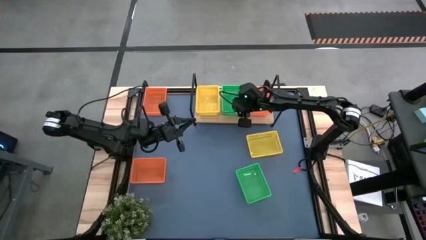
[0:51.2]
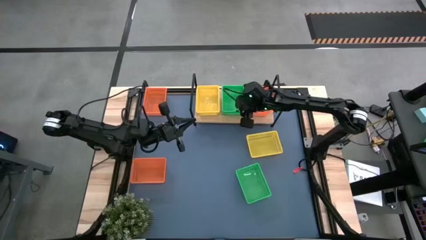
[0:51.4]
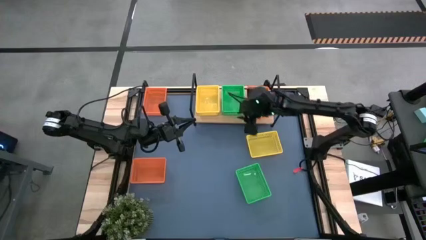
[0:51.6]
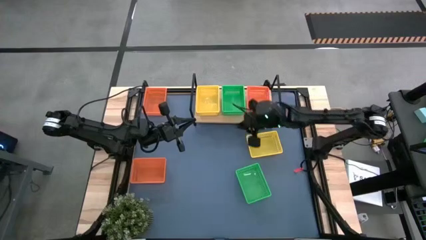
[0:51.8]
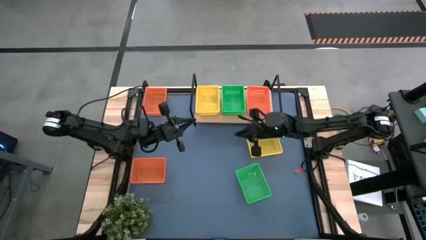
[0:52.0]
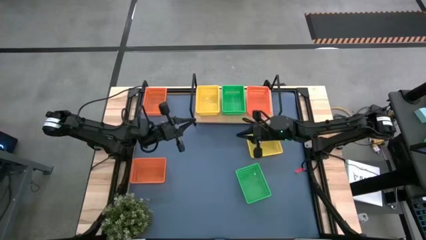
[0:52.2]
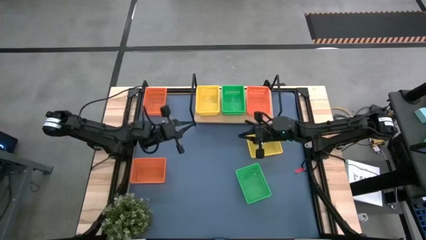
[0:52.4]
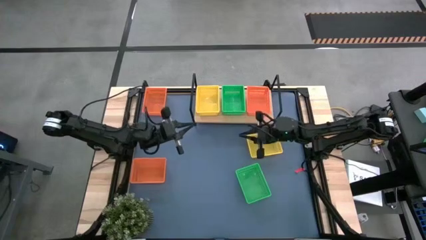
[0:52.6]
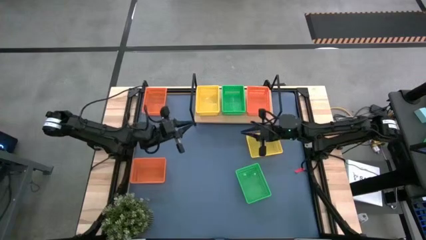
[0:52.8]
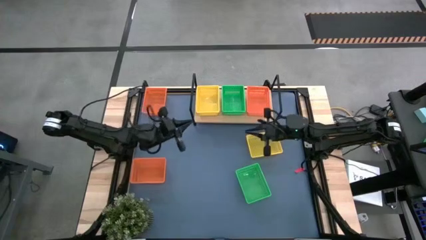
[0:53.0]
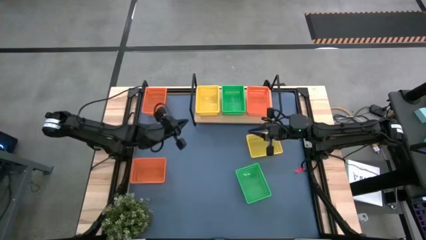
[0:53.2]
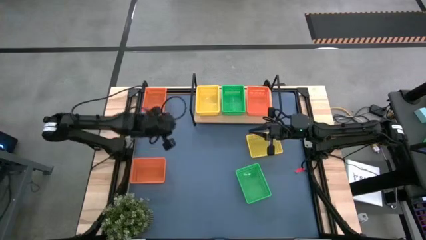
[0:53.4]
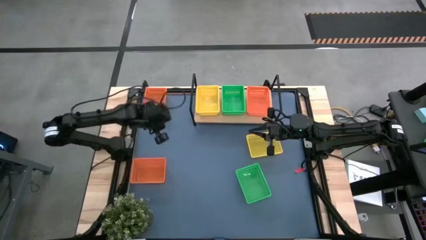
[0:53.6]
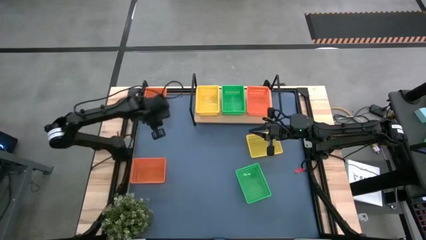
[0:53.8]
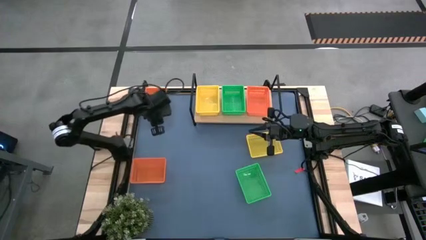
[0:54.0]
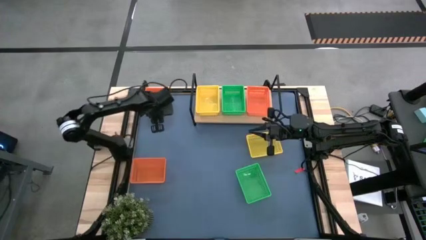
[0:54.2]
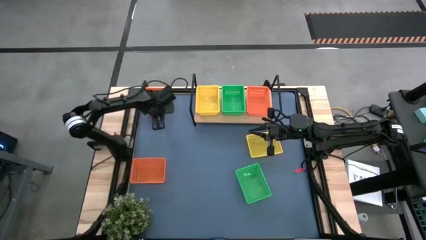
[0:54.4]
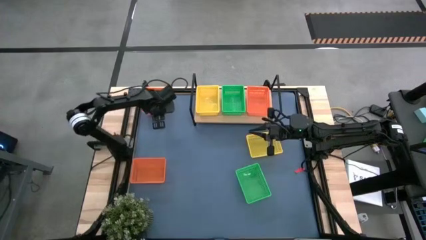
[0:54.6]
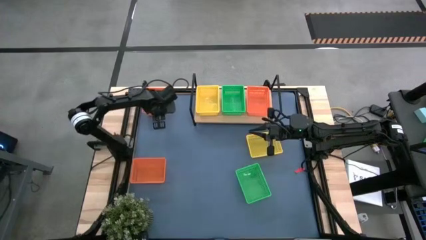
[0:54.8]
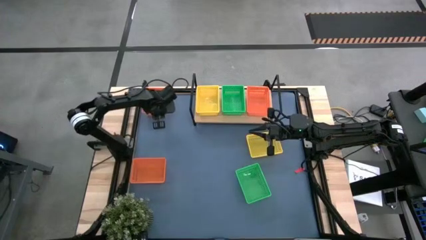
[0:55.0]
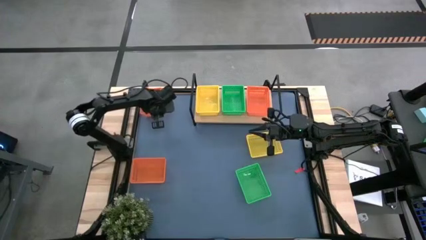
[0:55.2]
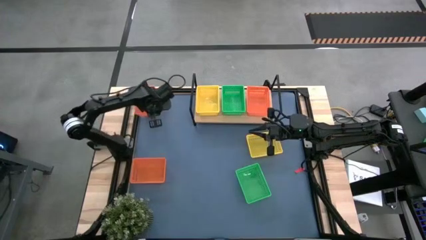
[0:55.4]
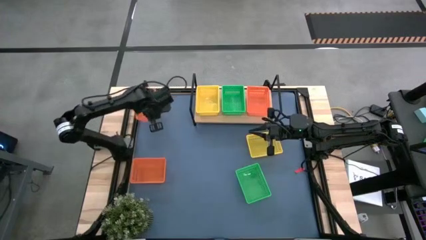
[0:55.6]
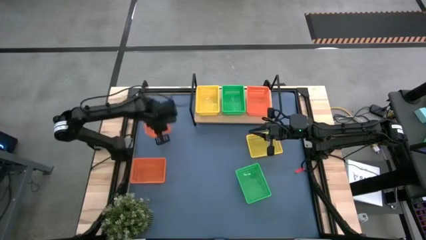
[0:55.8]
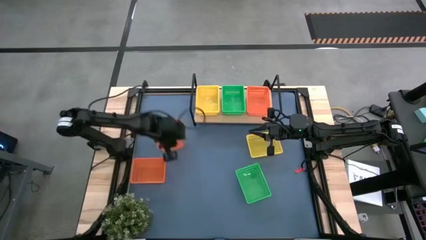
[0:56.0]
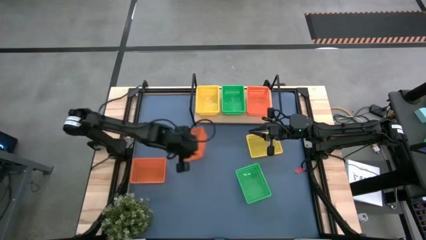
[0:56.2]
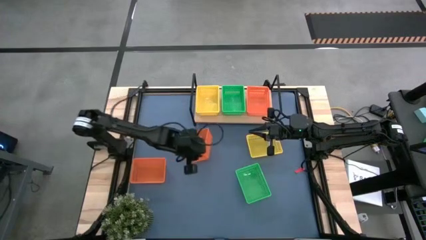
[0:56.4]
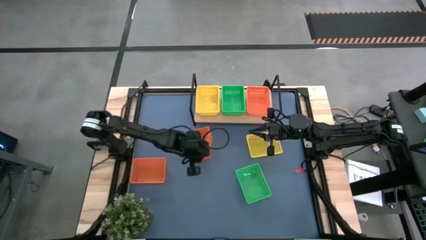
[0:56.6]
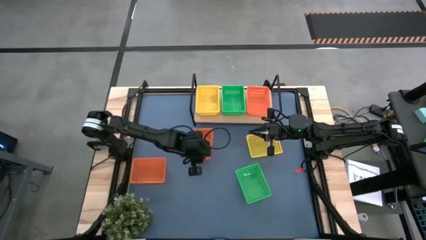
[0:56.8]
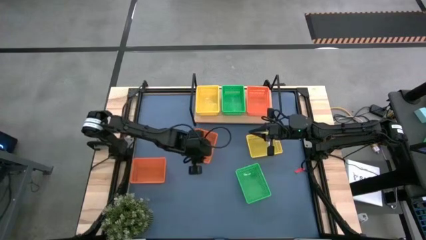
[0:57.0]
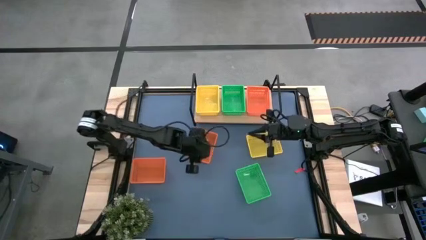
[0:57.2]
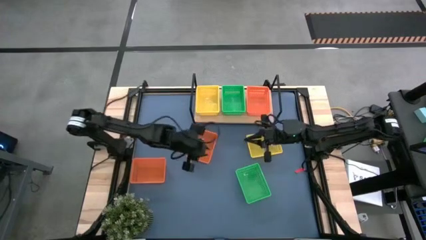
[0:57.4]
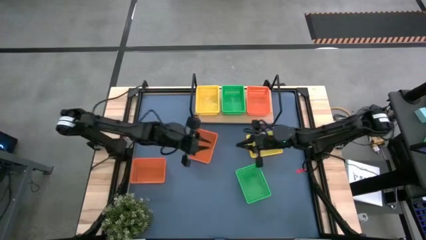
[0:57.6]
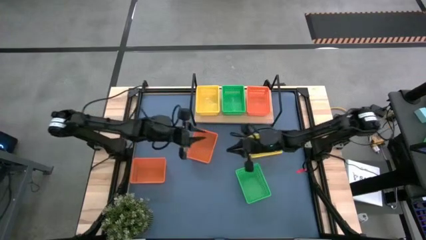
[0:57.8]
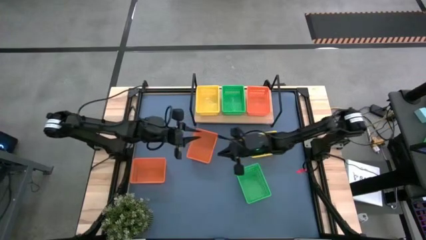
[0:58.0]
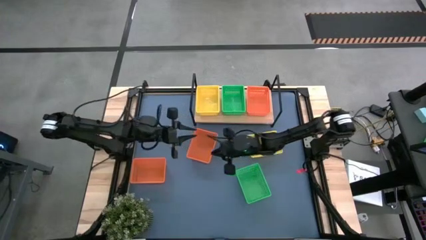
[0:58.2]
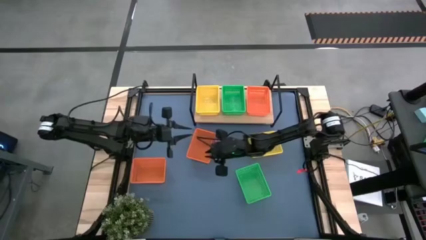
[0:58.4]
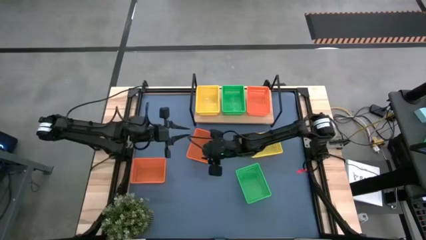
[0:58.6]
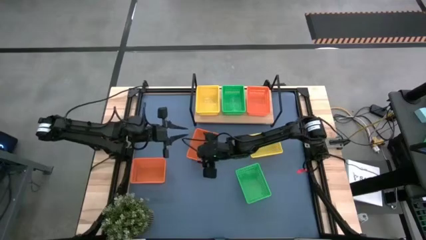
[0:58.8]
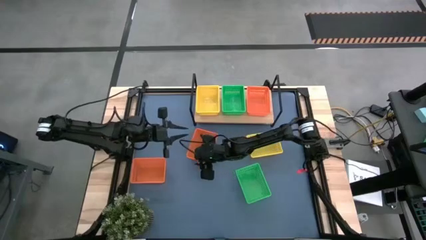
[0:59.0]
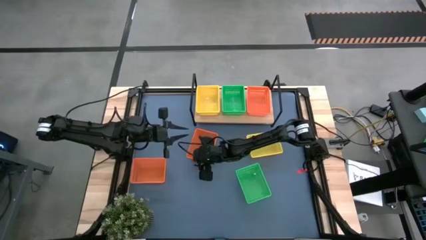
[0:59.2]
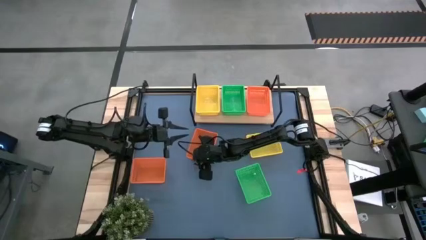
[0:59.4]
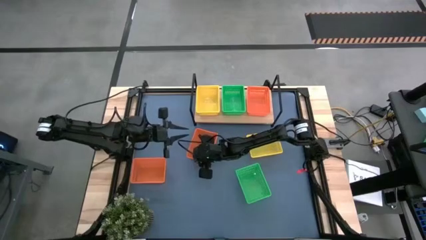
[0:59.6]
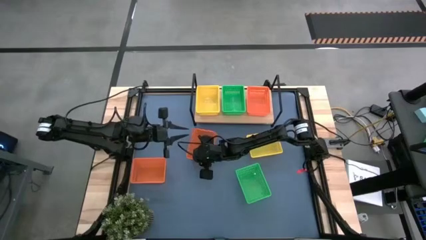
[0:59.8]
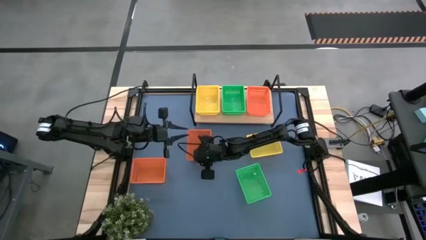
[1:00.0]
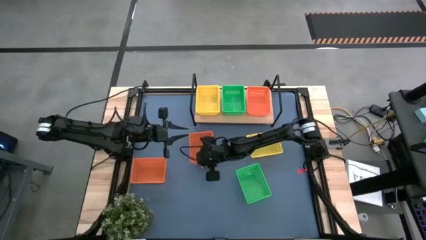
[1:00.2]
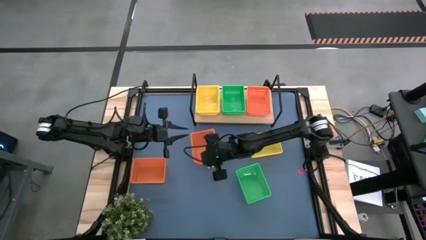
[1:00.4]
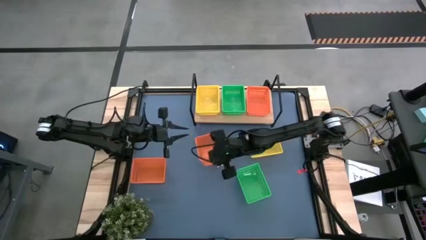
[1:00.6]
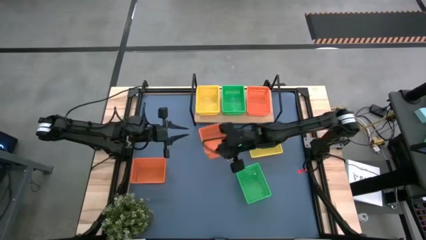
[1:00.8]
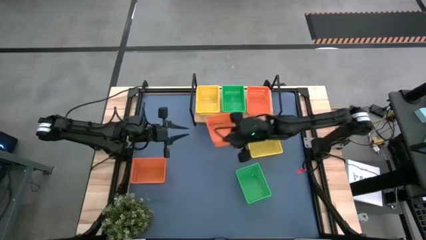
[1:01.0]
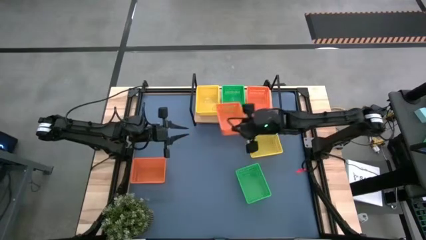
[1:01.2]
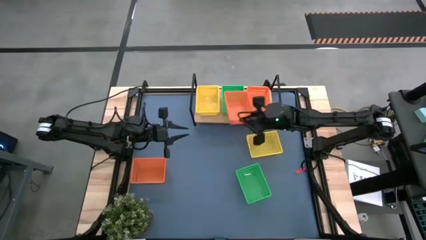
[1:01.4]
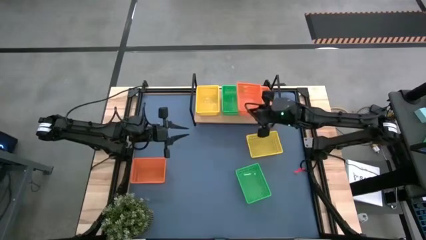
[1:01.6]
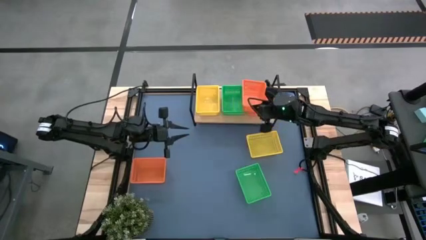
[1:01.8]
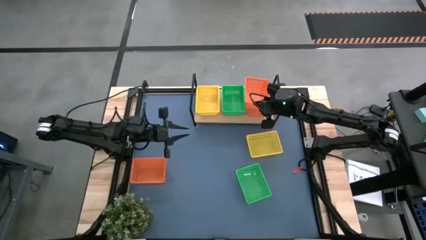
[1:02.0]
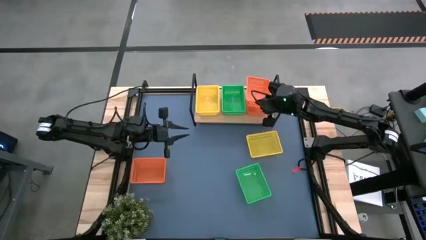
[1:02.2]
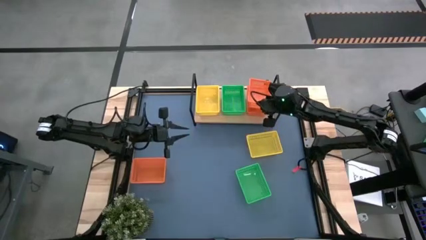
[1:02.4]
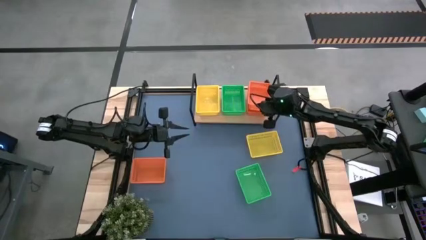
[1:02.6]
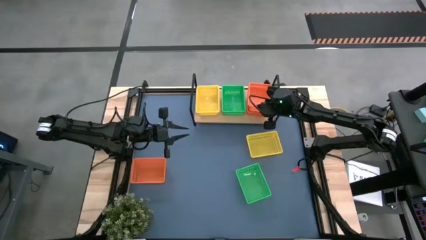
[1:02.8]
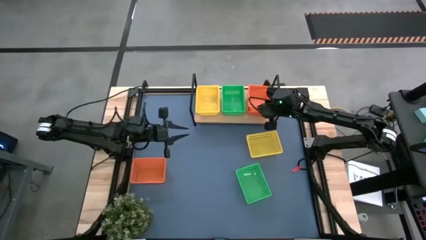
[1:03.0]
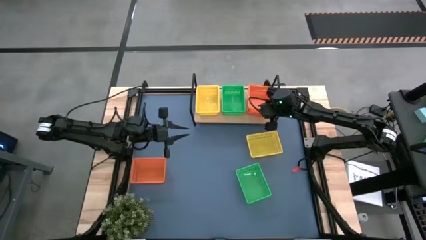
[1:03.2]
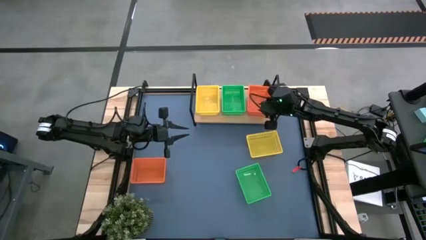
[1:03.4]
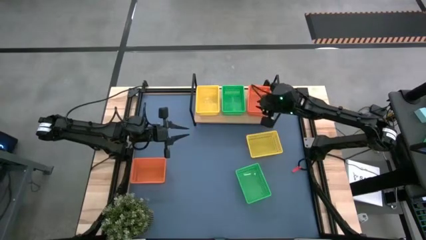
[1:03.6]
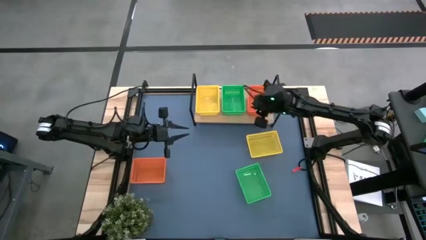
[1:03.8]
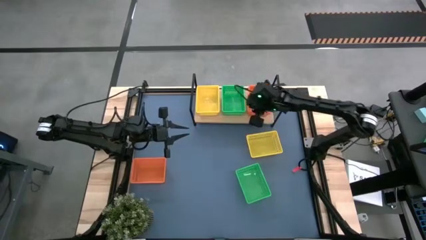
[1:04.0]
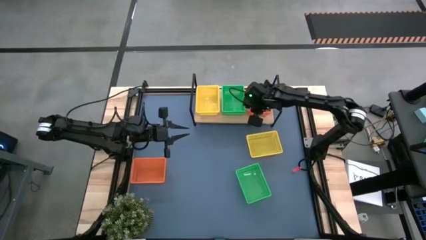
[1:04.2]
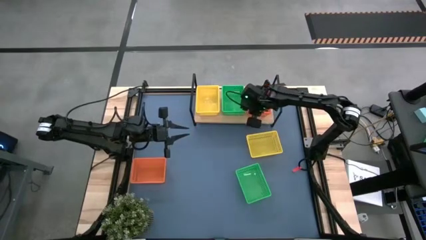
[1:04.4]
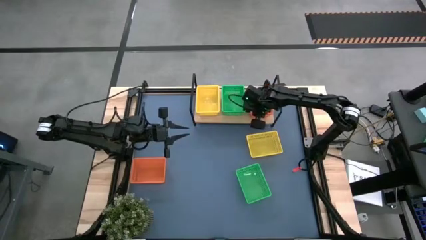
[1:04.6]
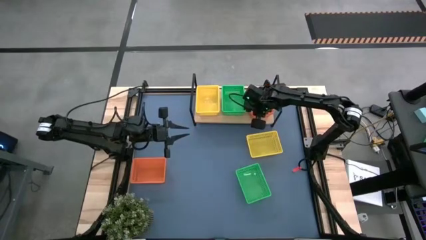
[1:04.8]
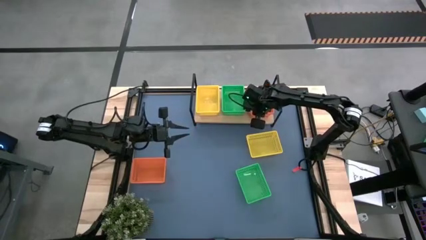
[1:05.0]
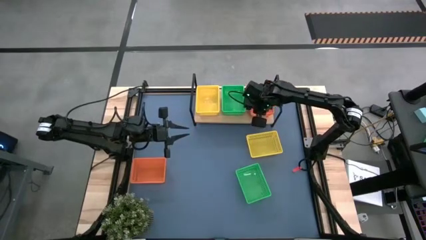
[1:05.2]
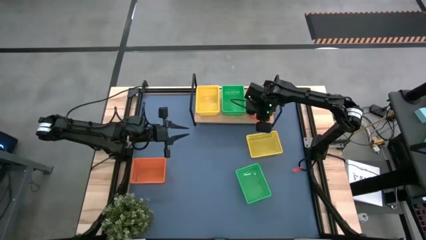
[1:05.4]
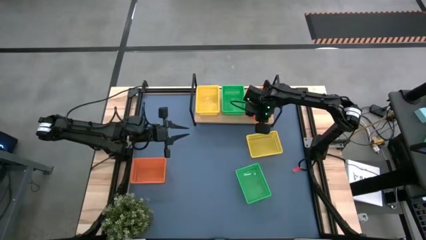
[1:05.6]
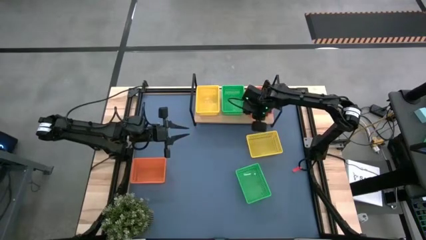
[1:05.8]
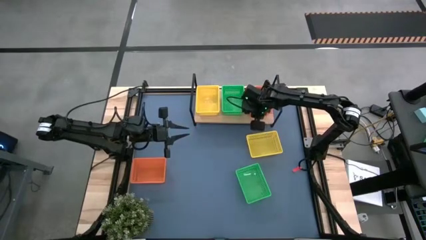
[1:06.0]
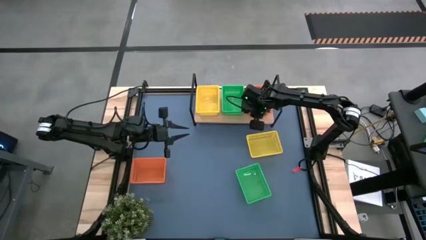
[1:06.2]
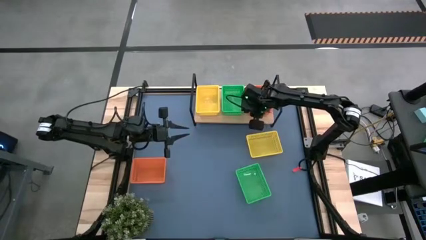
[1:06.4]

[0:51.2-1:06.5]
Task: Stack baskets on shelf by color
Stack the top orange bin on top of the orange bin on the shelf

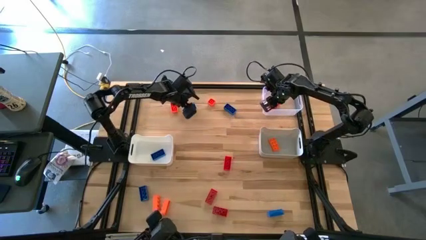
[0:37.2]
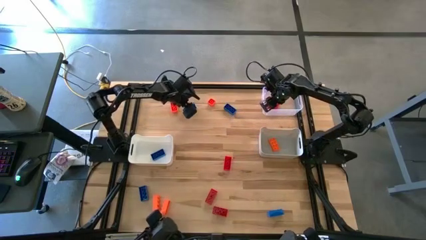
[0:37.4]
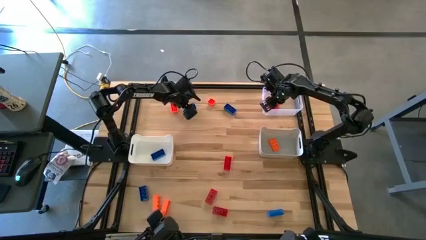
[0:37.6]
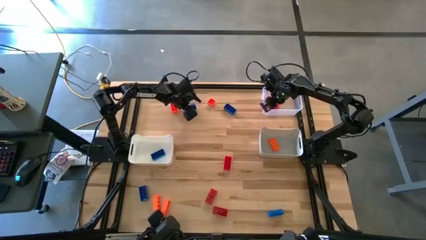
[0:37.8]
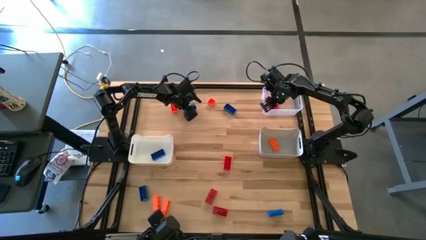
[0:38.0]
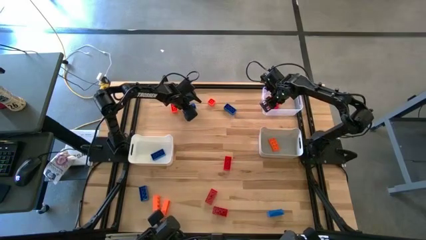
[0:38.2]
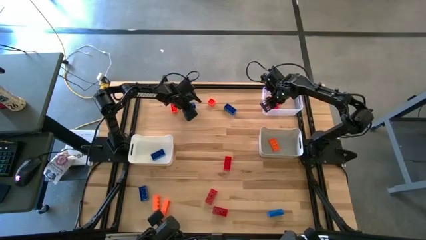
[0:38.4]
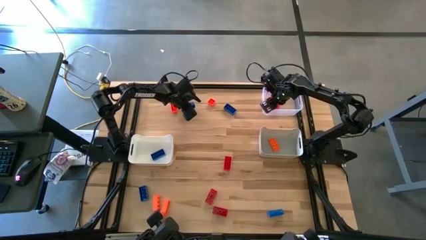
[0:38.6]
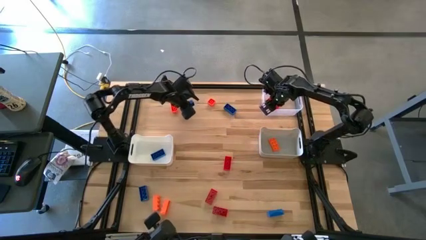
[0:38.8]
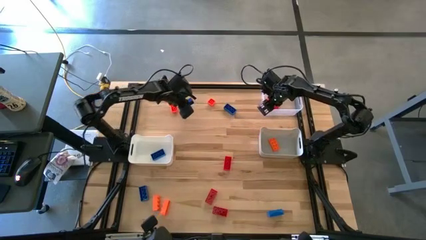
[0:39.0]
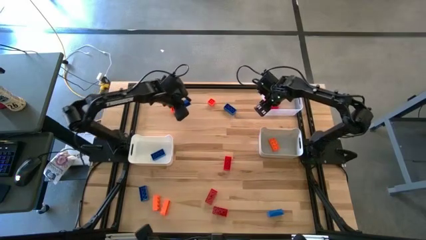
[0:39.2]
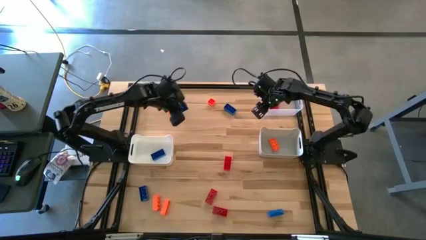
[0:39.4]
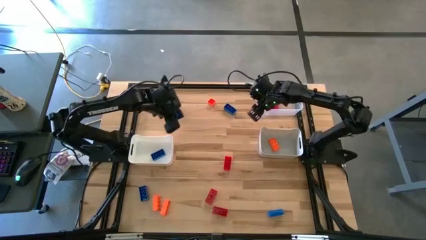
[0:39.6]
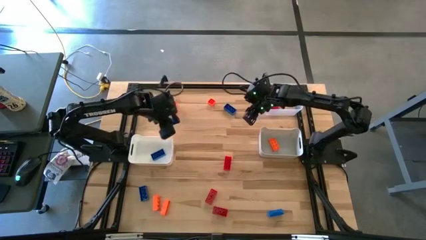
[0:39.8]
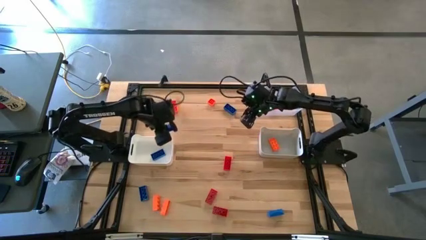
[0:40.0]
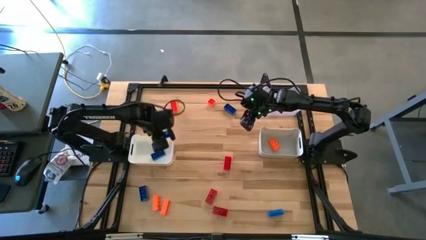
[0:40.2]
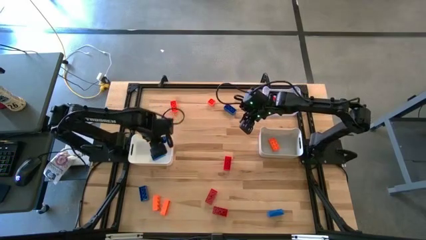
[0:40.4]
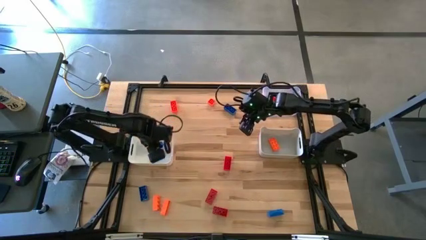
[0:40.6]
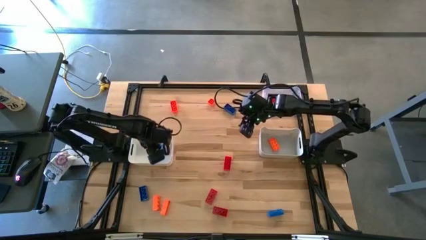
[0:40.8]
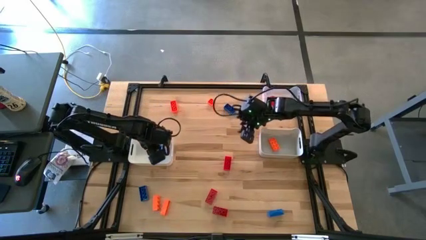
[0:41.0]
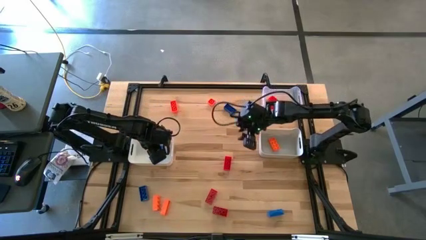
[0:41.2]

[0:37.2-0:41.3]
Task: Sort & place blocks by color
Put the blue game piece into the white bin
